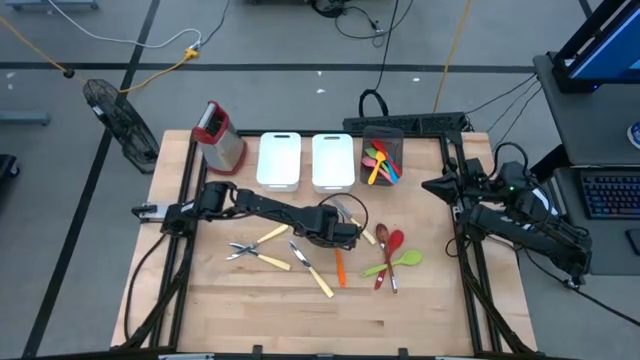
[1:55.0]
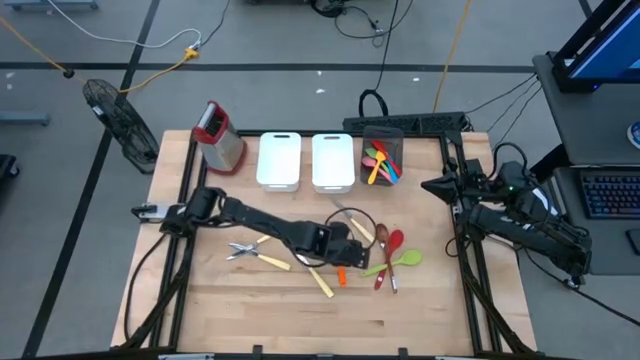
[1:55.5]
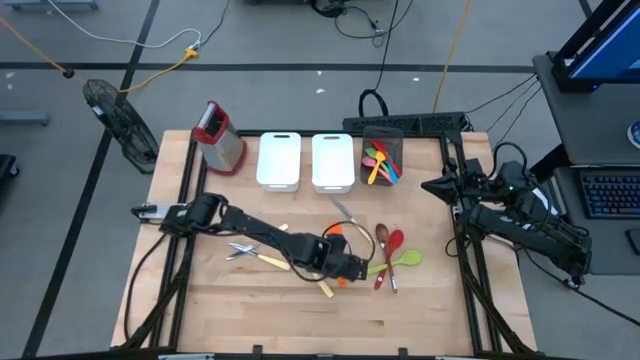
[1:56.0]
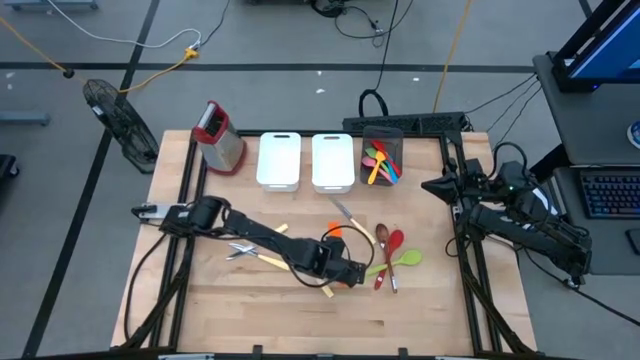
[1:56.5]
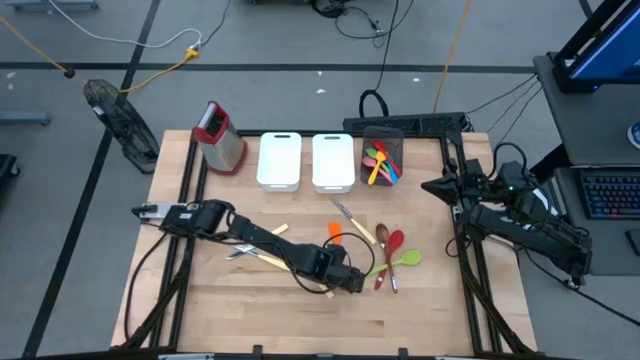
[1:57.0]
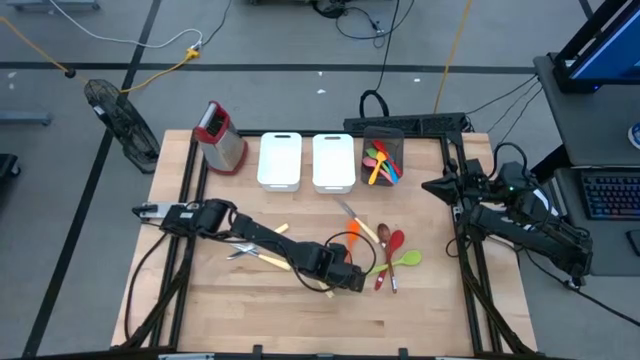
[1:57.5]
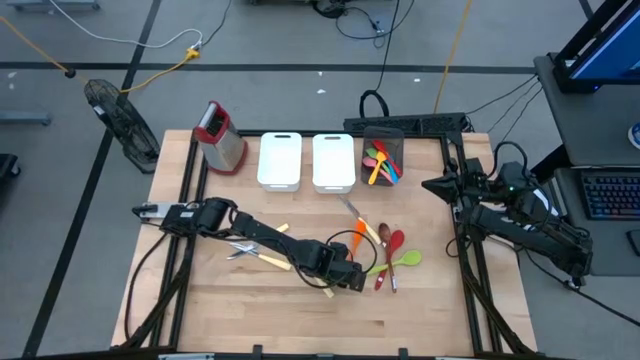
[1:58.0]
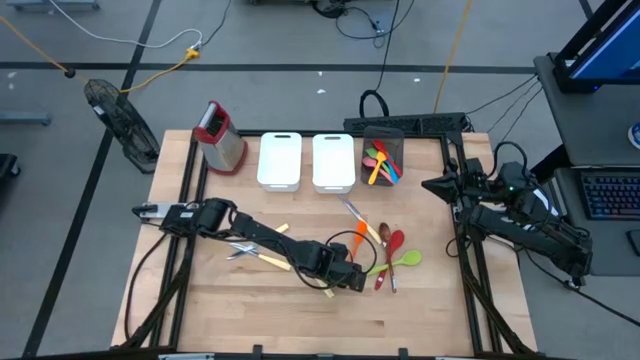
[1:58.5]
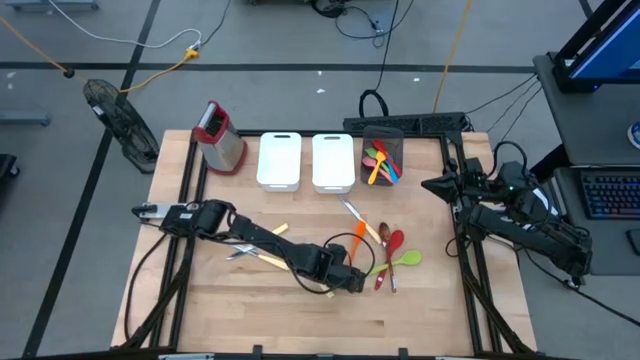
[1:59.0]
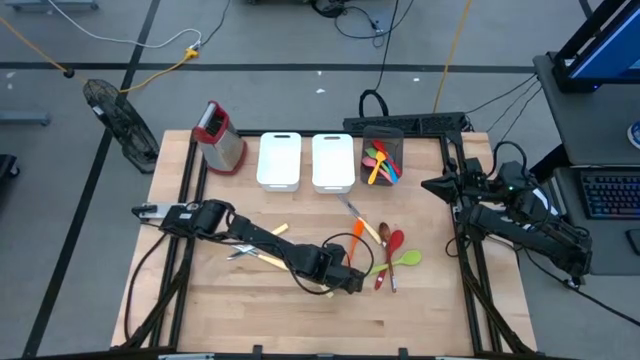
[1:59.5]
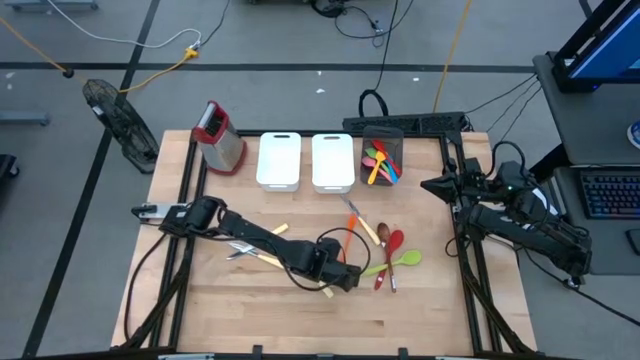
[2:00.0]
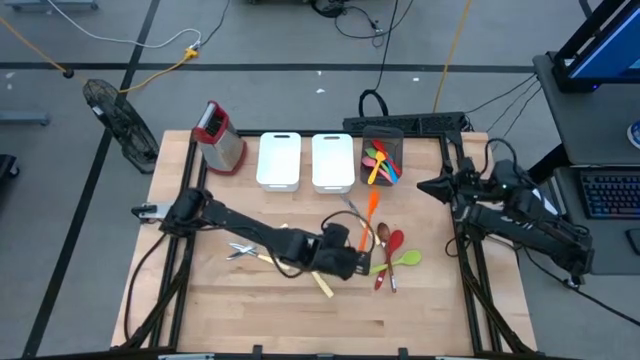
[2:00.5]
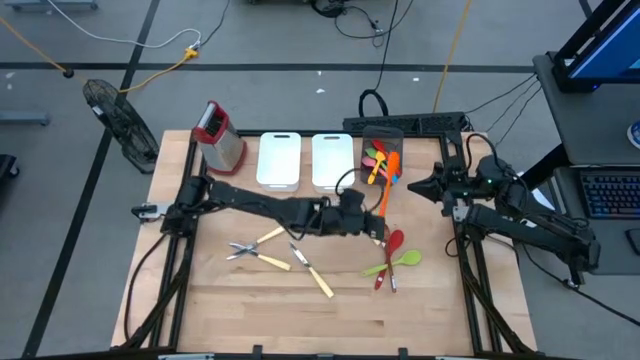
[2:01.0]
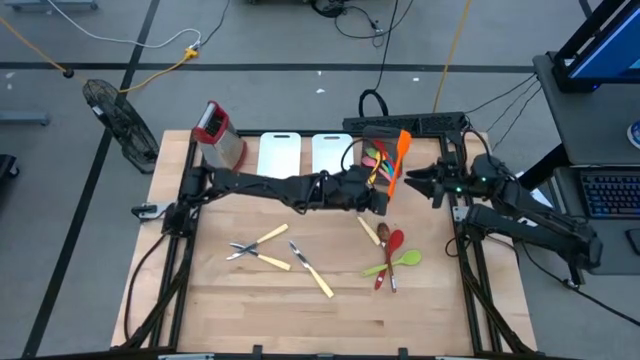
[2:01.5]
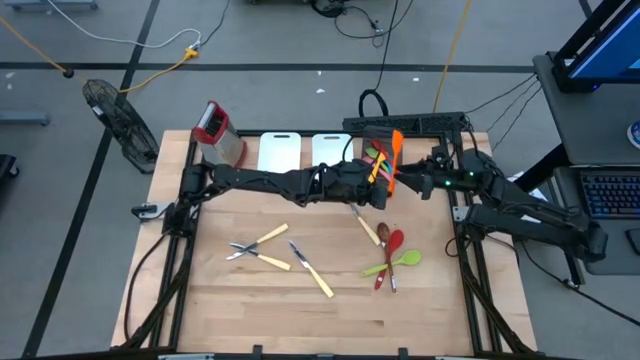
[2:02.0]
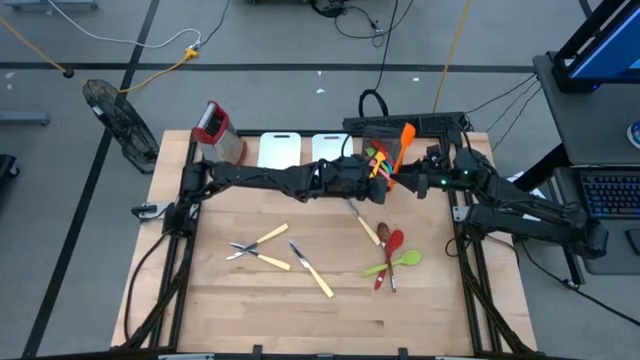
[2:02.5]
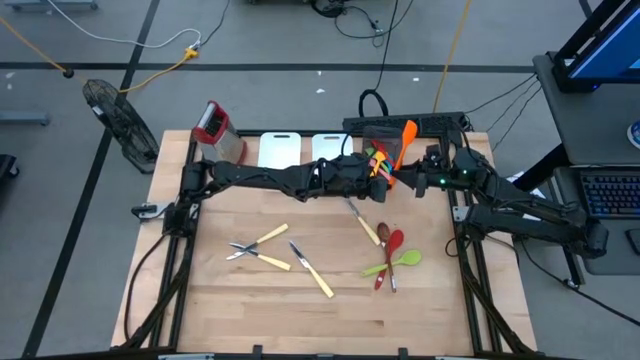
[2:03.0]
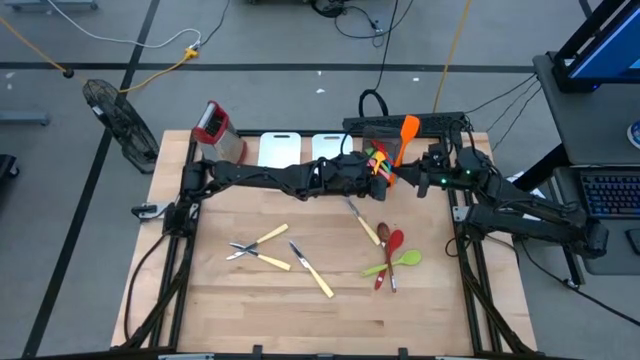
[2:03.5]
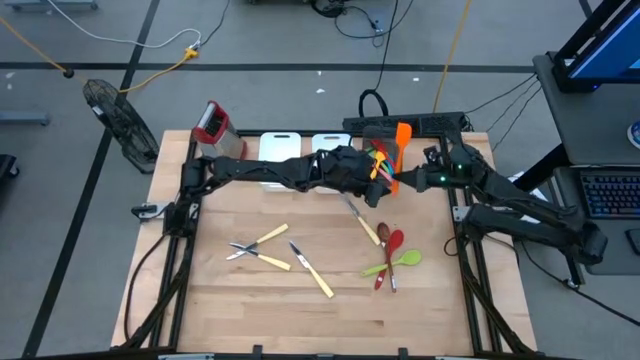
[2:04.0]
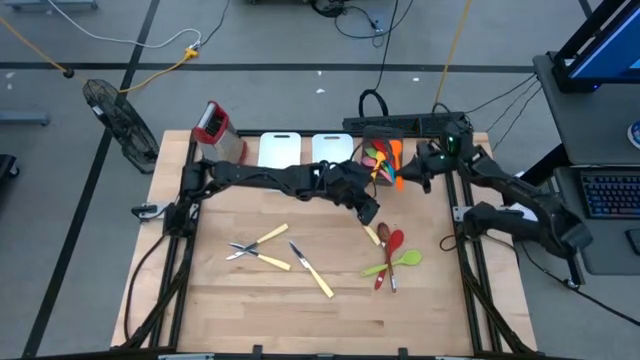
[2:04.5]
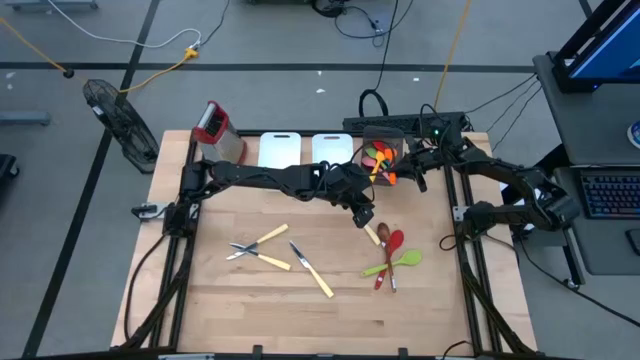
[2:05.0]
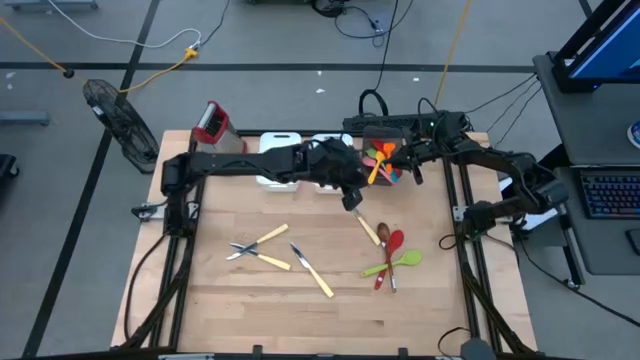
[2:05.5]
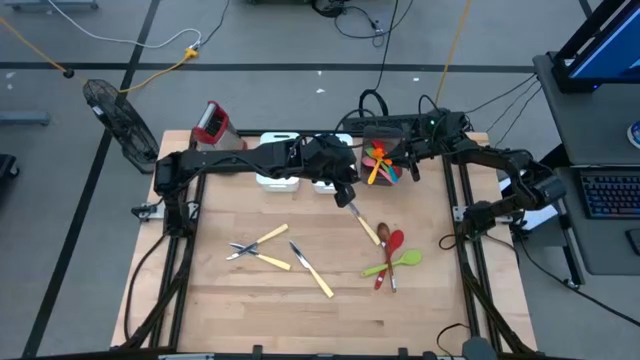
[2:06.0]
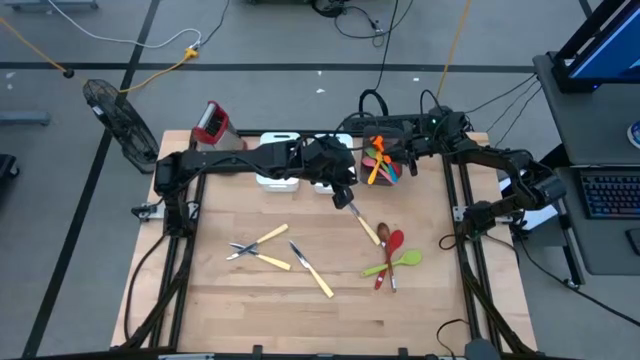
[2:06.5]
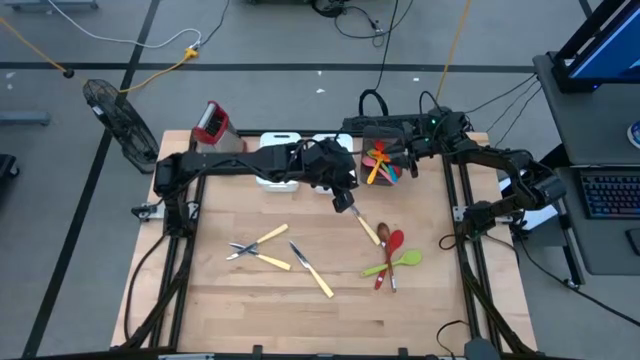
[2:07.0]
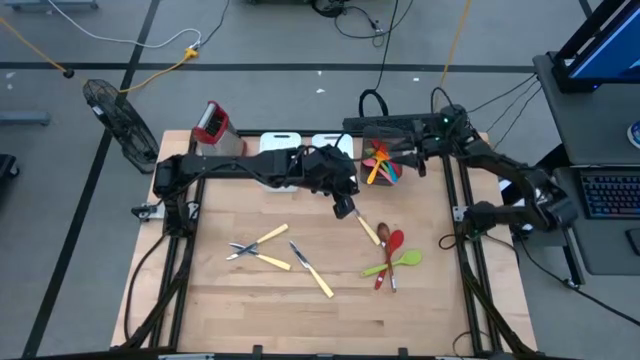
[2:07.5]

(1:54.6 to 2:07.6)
Task: Pick & Place Kitchen Items
Put the orange spatula into the black bin
